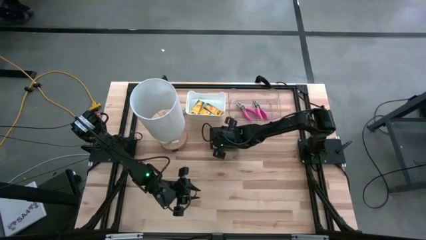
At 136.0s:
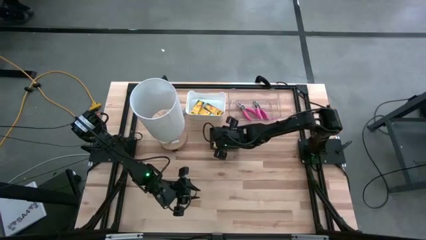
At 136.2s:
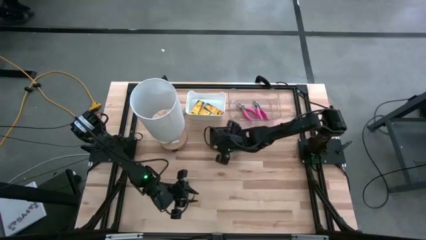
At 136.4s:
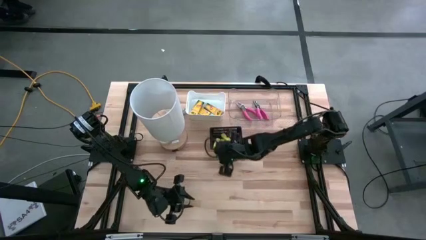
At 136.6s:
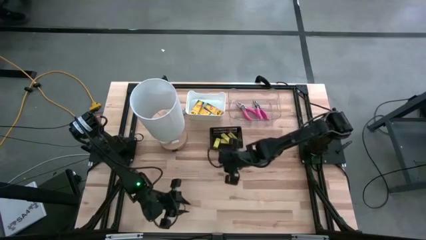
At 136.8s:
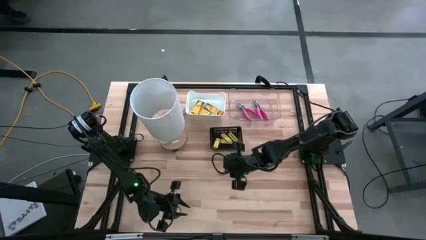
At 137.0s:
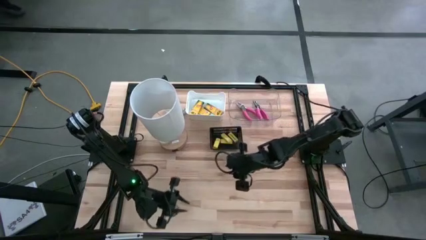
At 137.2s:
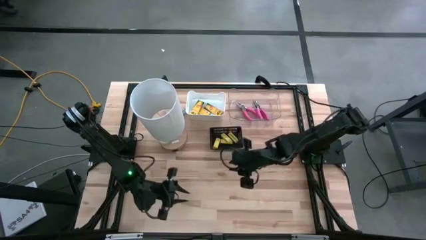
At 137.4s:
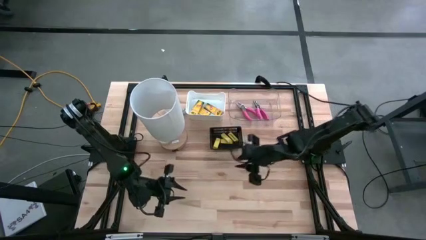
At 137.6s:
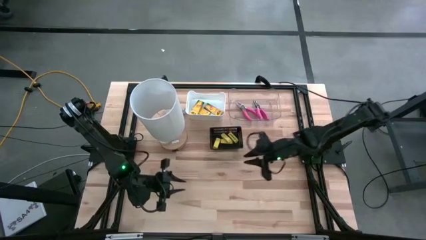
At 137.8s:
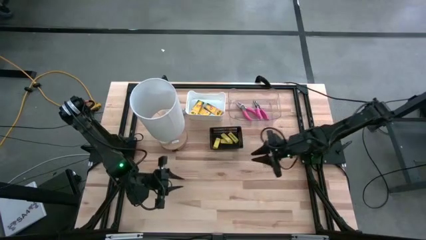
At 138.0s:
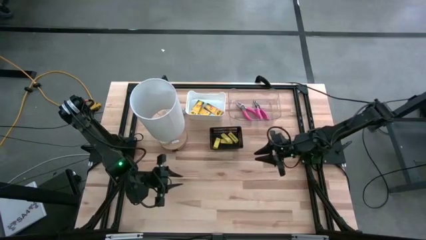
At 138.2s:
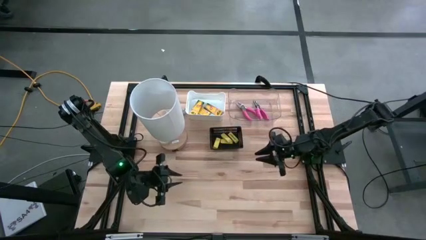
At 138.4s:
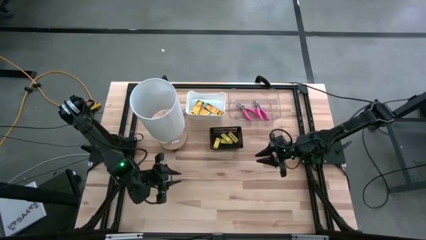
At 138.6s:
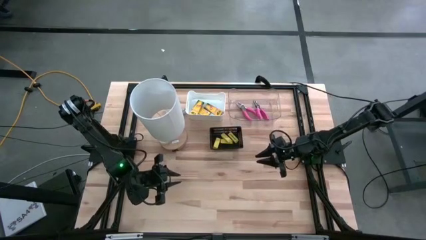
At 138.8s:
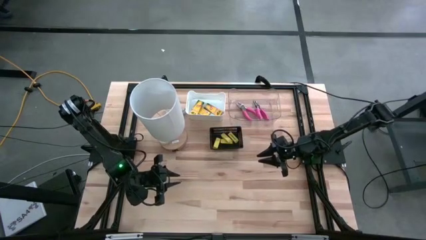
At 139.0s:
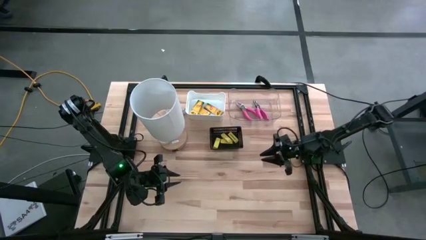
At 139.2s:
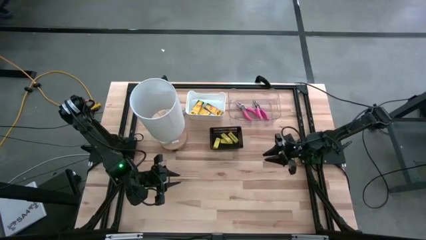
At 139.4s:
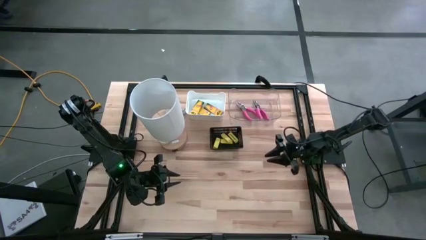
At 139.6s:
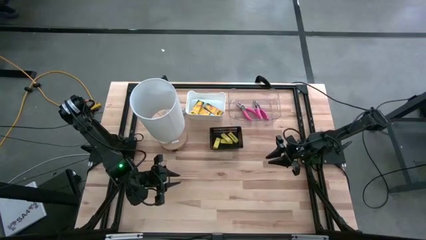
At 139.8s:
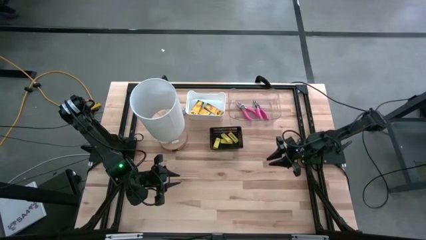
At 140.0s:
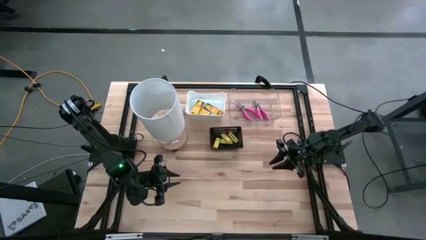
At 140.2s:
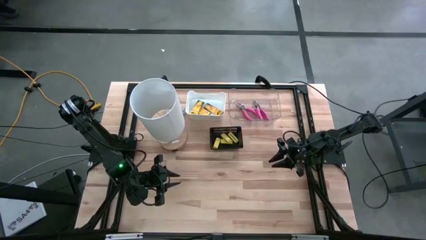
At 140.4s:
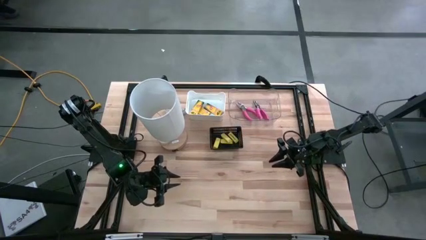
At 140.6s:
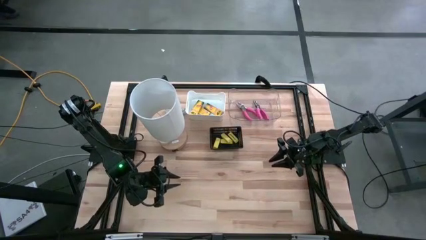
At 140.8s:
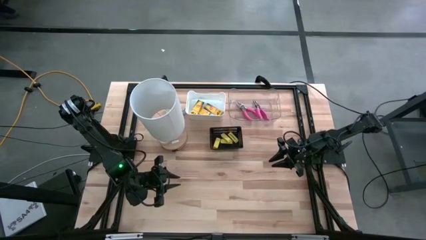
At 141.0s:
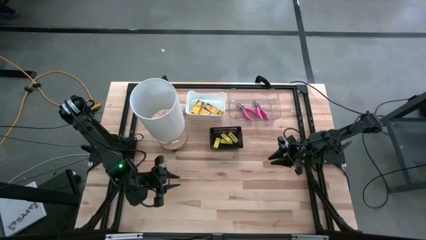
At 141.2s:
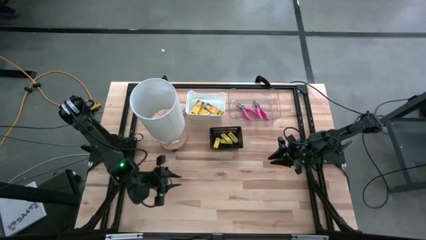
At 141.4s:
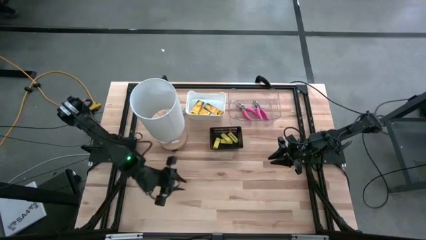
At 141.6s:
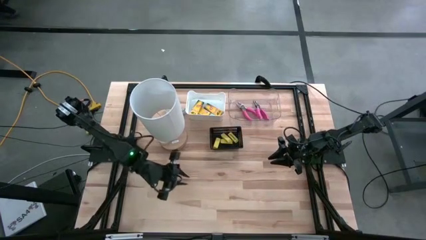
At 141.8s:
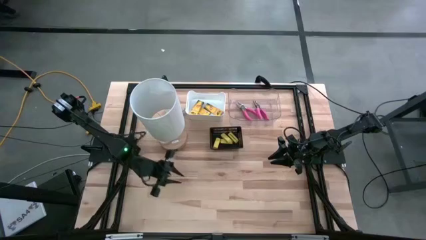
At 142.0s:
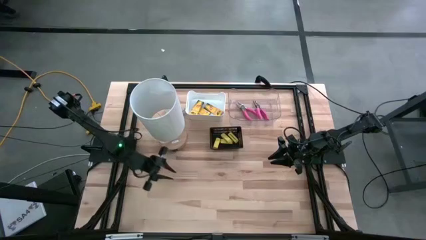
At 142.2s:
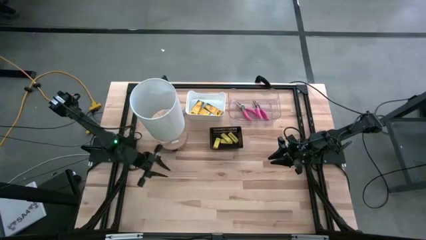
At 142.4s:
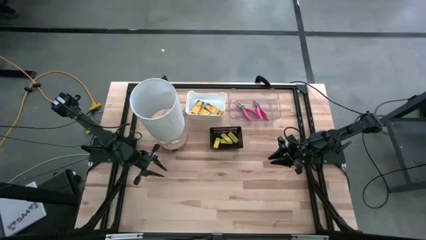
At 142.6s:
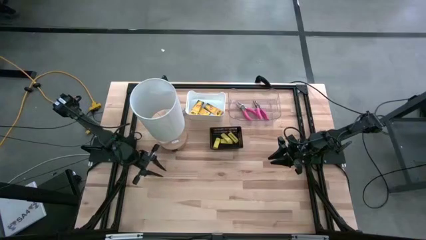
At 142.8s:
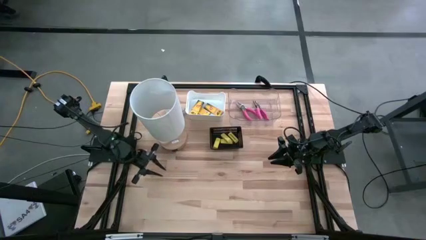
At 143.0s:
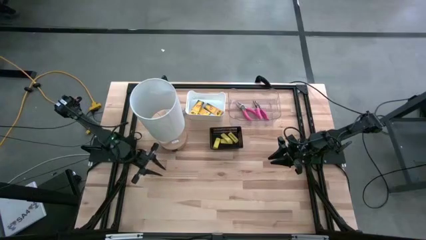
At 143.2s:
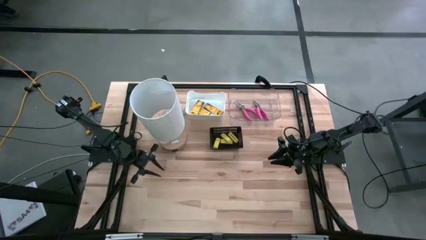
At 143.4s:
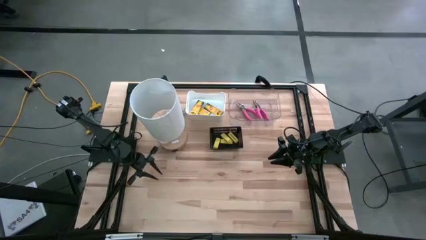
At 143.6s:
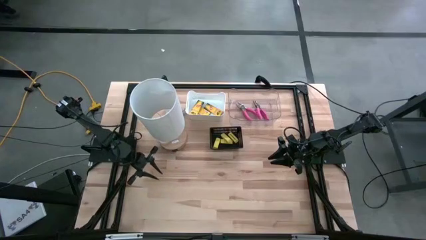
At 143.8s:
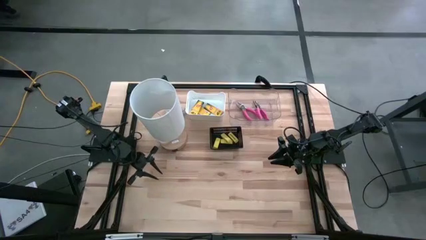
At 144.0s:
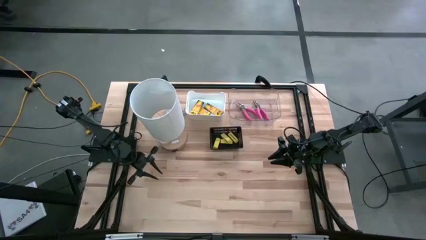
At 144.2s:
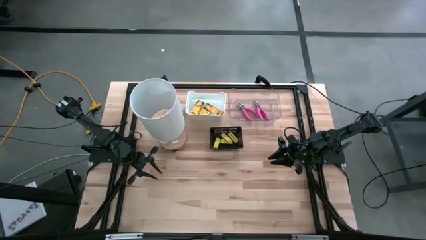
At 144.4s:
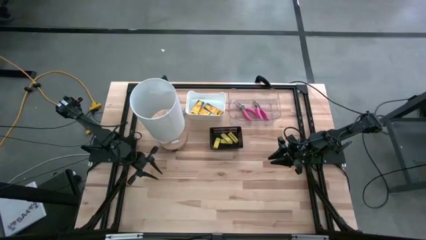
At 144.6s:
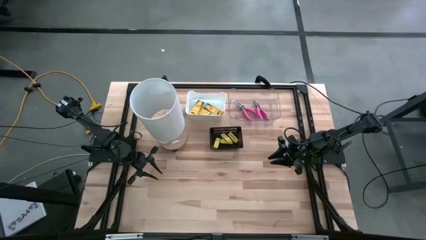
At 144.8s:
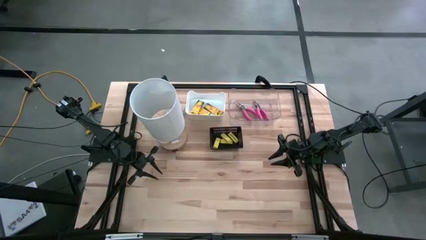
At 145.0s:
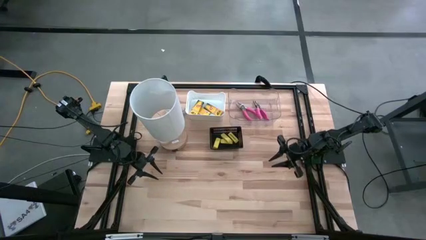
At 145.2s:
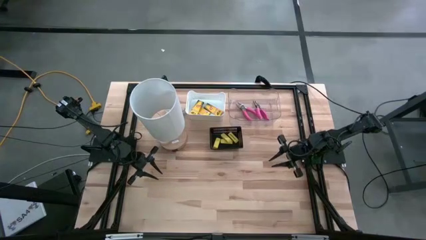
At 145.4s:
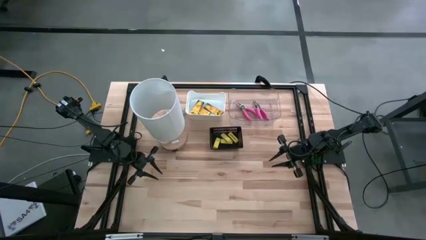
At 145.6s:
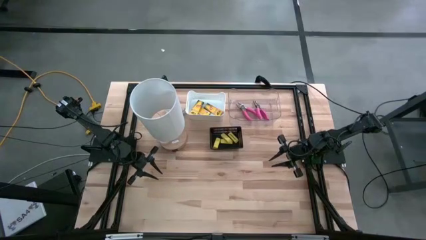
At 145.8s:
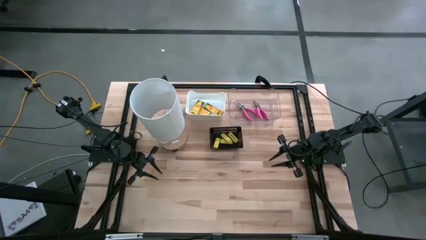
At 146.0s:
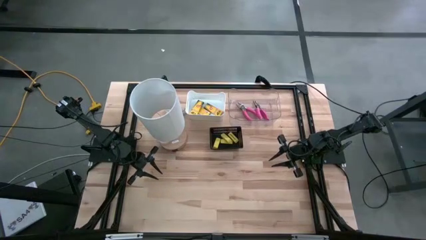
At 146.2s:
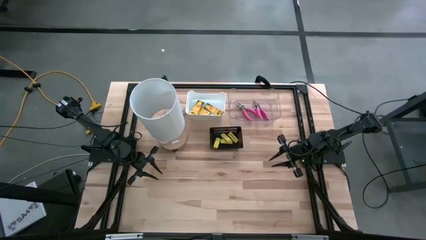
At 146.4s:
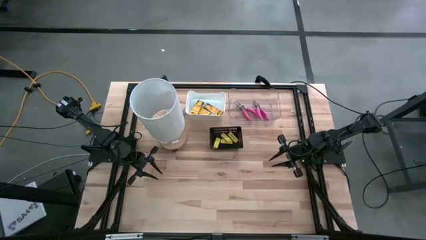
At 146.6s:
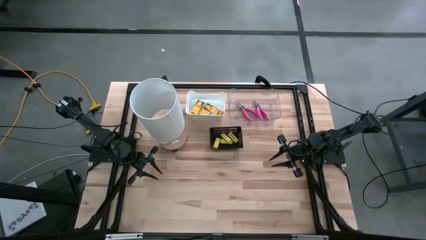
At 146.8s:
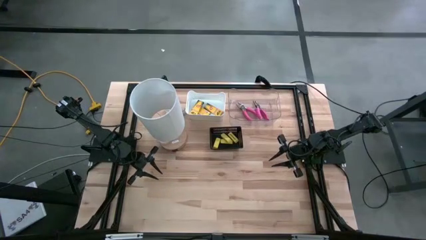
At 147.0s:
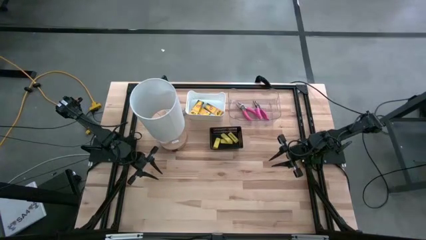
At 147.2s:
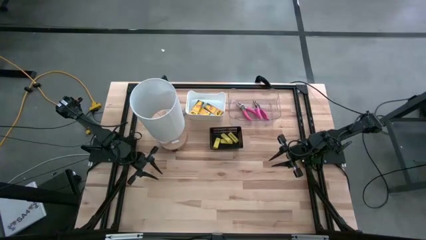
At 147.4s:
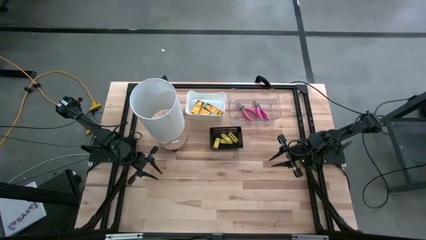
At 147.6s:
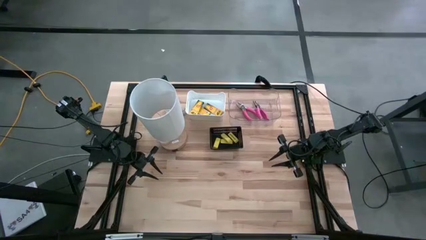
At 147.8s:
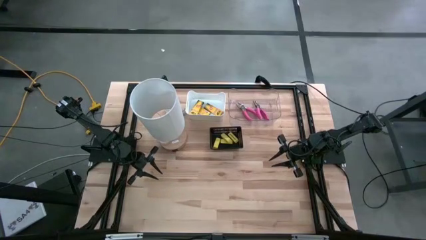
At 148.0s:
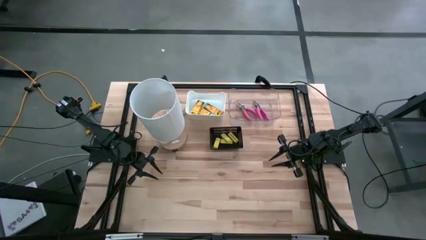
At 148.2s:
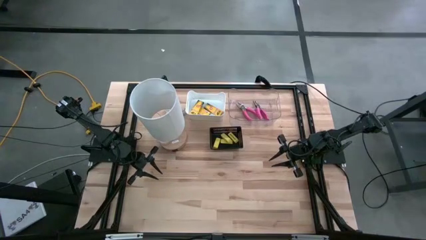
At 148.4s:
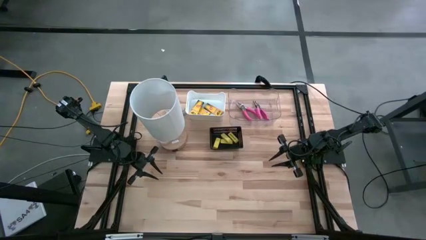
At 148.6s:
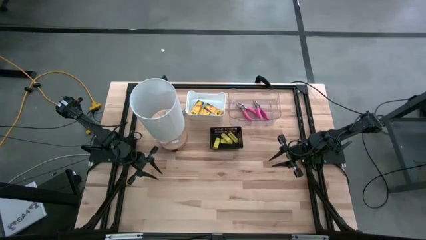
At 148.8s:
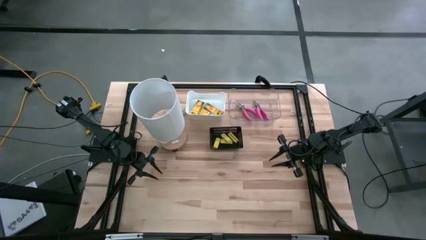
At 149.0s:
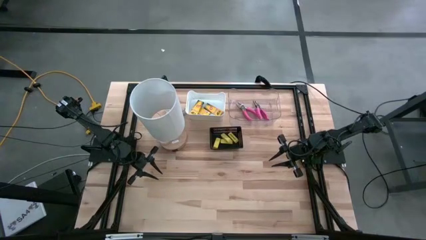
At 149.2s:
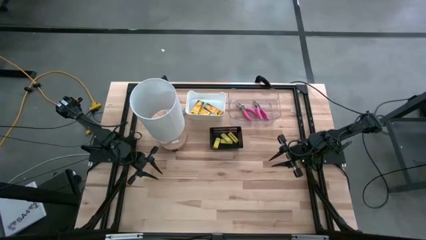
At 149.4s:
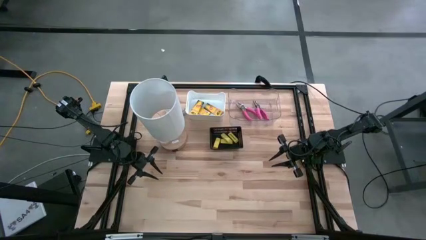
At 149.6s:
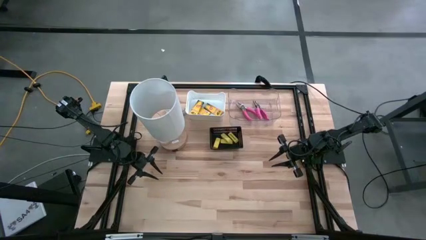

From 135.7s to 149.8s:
Task: Pick & Place School Supplies
Return to Home Position

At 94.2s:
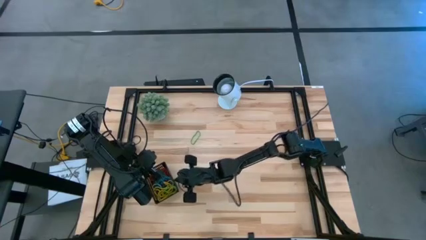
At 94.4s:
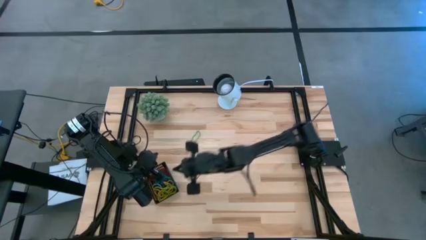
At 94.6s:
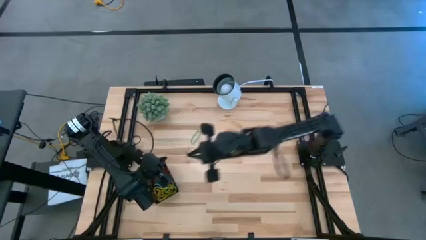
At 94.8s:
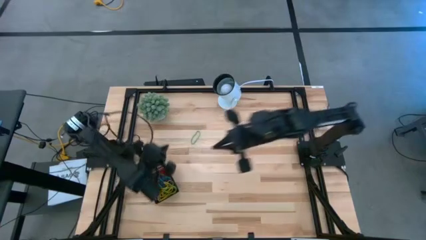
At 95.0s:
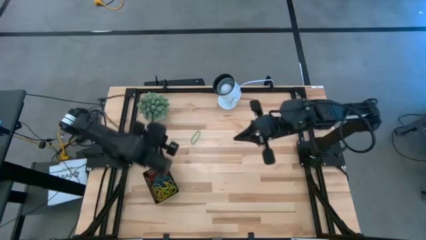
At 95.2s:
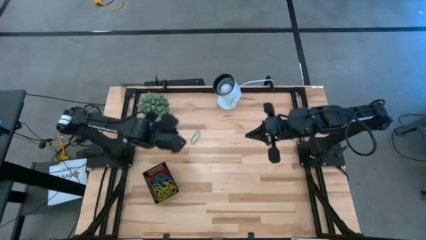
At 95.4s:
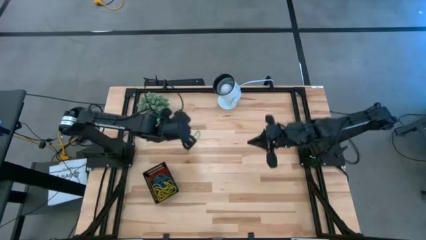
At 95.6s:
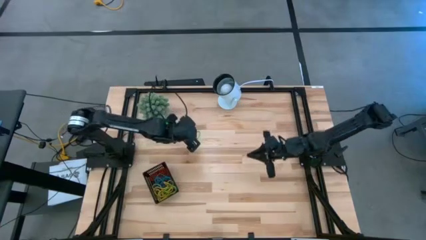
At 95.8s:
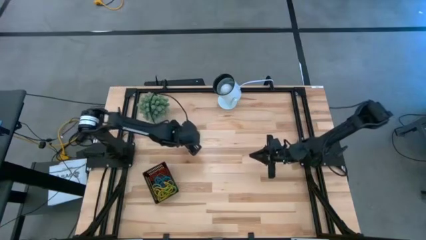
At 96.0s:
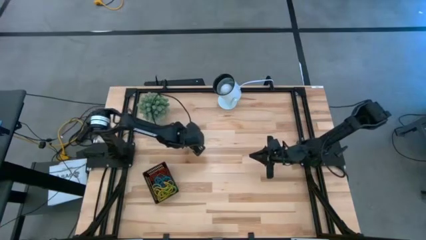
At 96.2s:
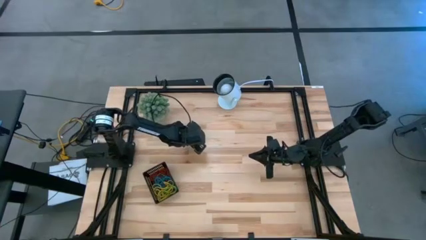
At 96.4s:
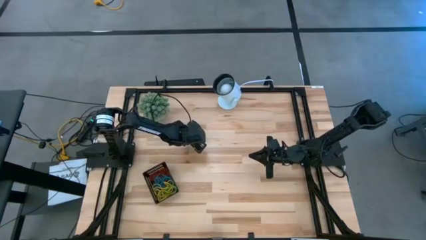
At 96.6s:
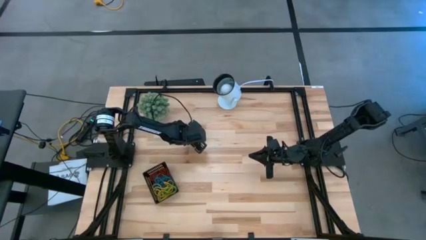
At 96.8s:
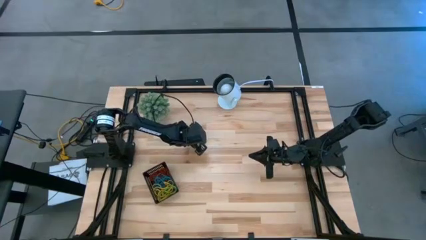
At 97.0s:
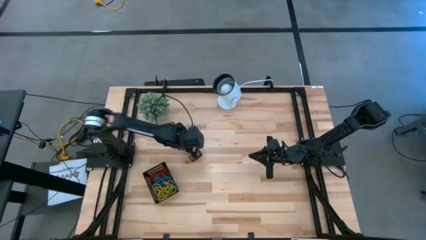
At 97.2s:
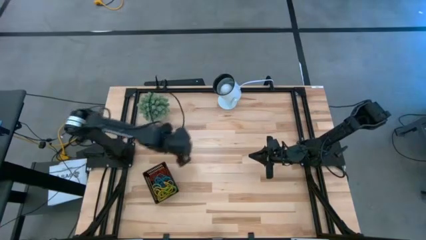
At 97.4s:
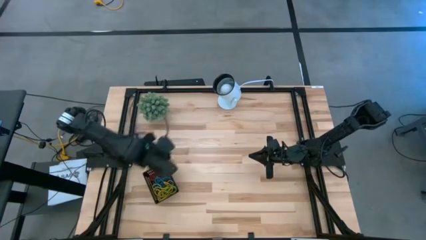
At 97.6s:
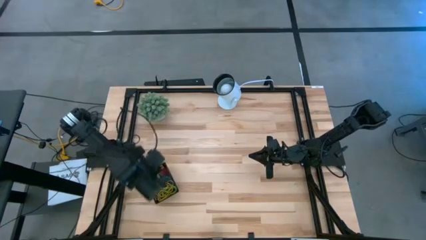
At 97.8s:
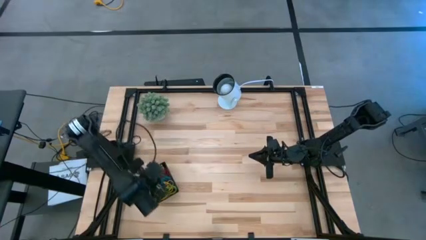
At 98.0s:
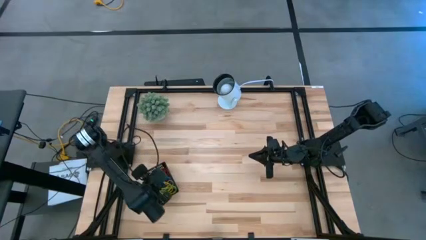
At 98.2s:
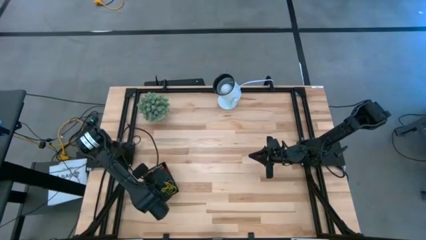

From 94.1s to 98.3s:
Task: Pick and place items into bin
Put the green rubber band into the black bin
